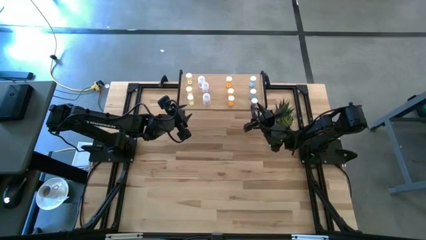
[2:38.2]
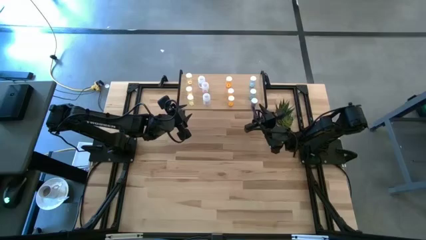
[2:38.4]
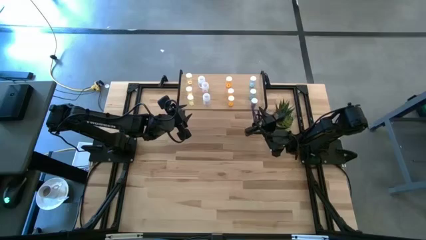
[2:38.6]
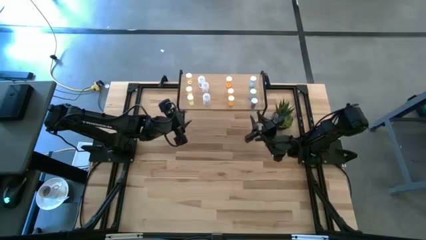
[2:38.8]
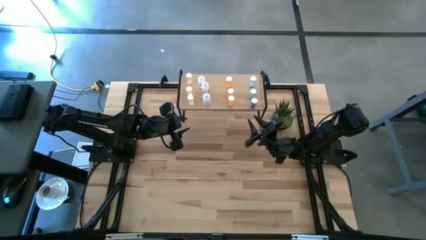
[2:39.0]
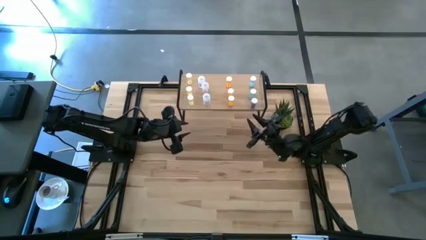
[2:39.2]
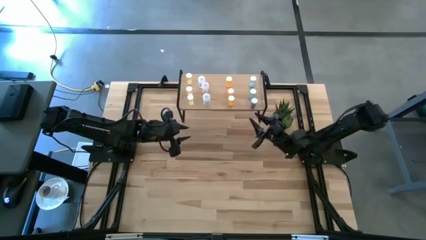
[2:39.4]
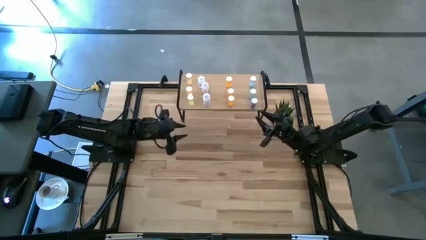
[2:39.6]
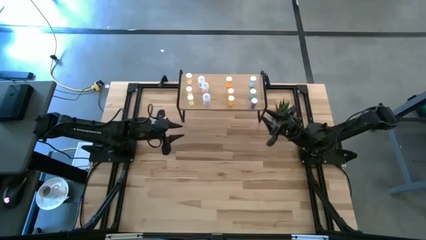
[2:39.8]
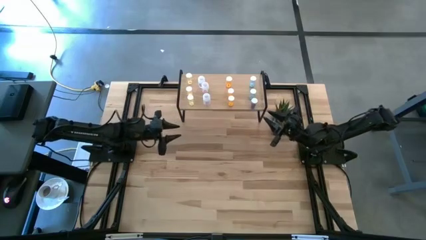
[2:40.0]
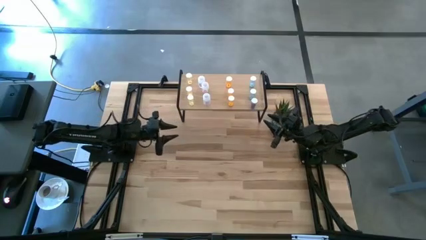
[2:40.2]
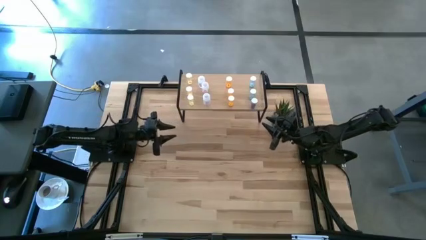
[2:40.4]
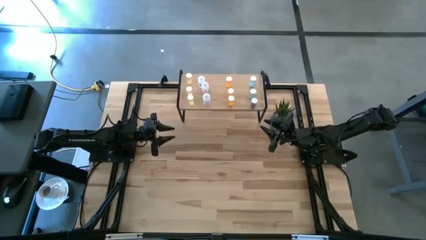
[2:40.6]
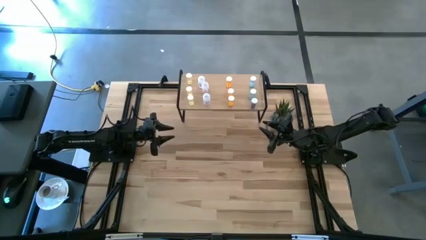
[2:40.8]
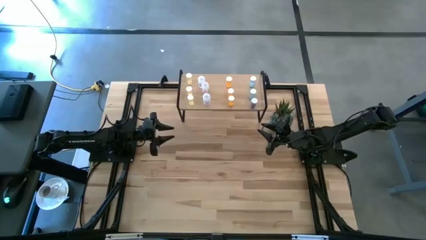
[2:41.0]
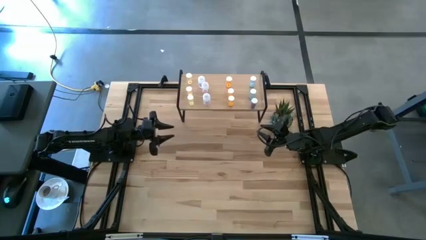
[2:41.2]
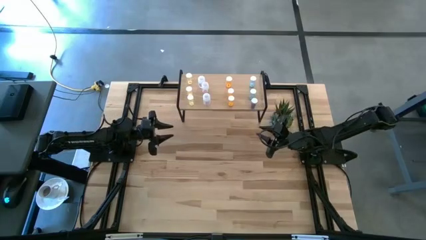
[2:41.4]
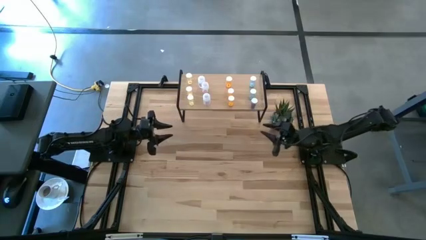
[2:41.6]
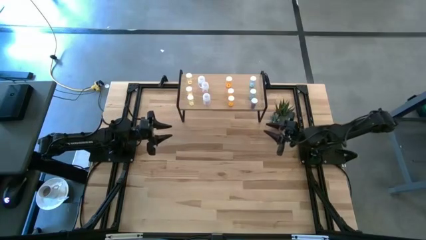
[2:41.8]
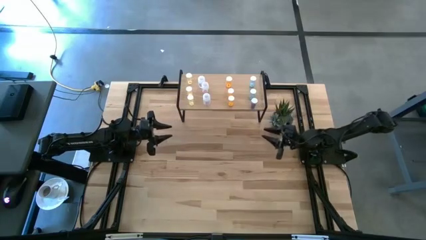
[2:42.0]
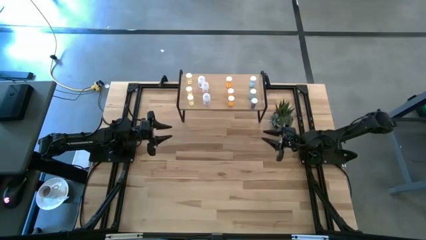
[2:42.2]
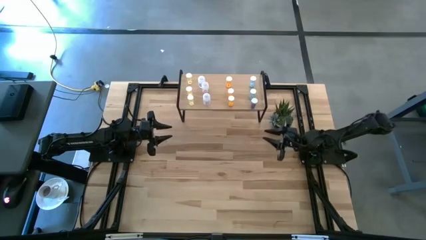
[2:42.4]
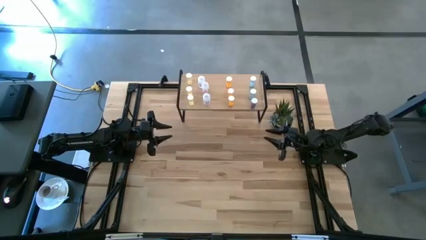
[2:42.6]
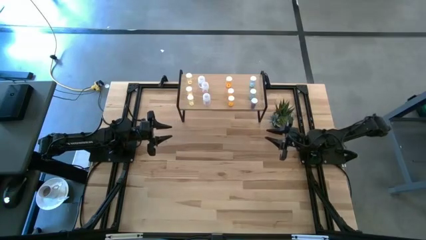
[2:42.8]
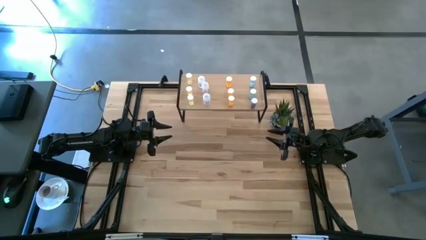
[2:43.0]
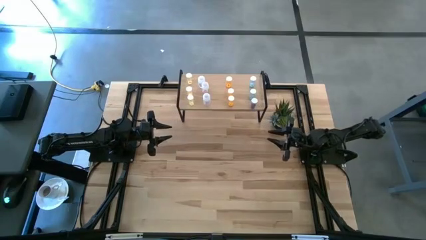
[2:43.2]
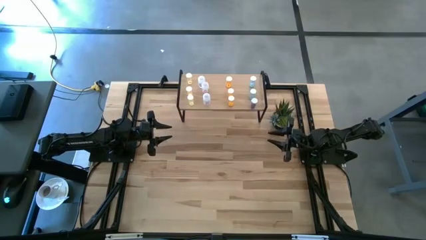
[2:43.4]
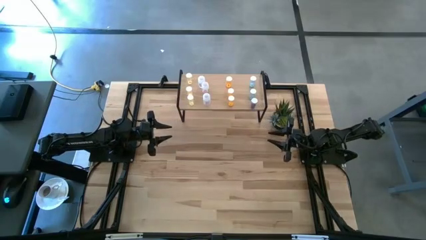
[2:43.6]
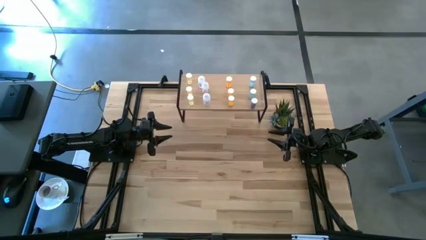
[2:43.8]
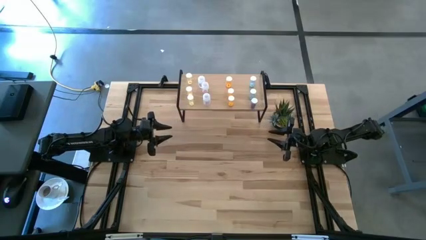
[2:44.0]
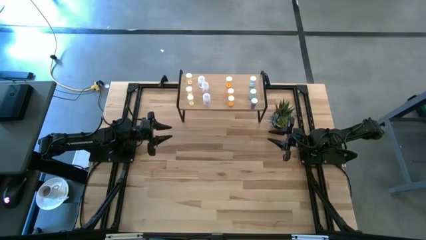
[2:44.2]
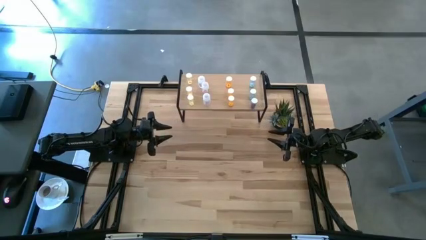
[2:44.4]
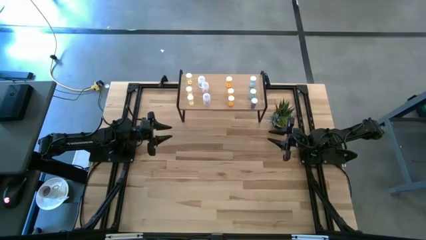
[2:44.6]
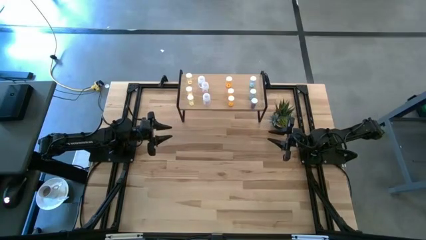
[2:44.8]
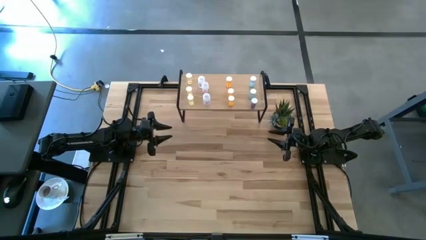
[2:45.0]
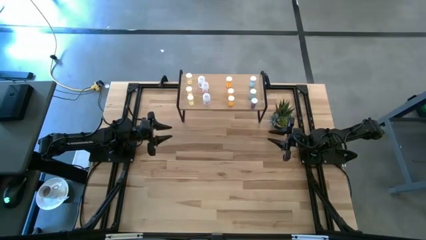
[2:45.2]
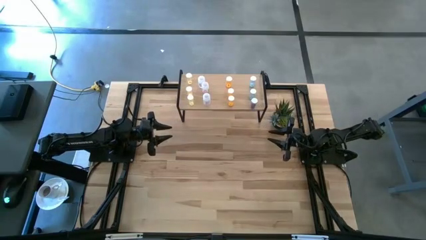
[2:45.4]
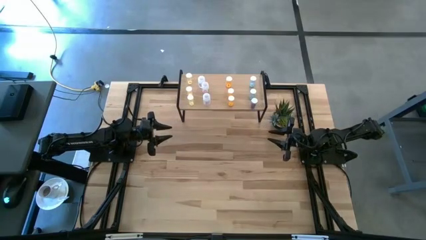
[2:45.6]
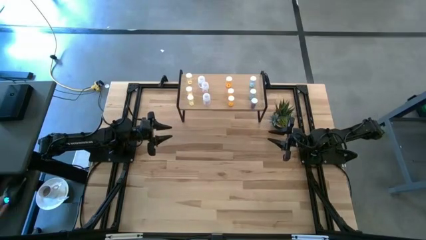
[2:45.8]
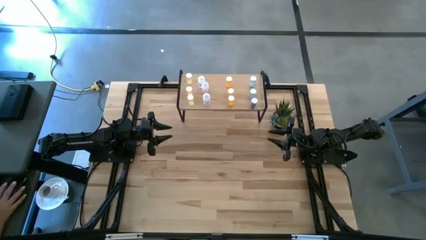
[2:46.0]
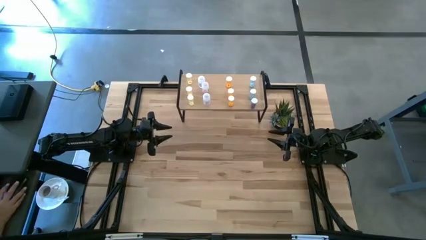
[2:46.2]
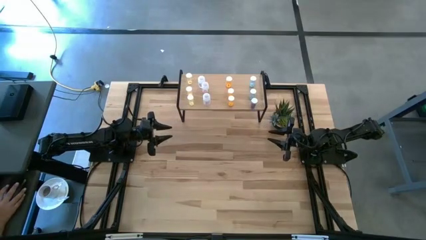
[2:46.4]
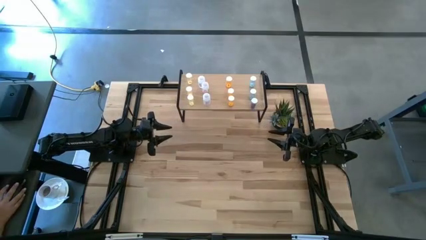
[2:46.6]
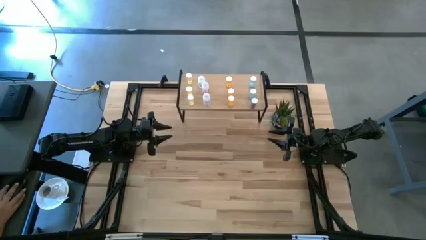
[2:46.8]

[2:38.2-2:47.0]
Task: Pick and place medicine bottles onto shelf by color
Return to Home Position

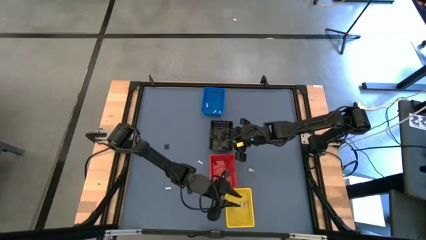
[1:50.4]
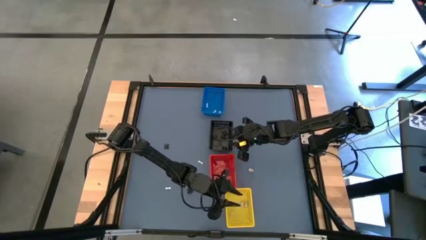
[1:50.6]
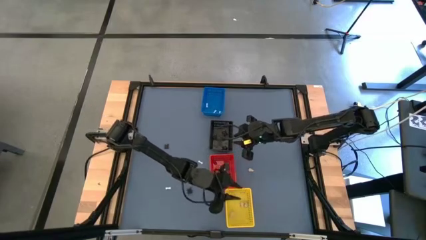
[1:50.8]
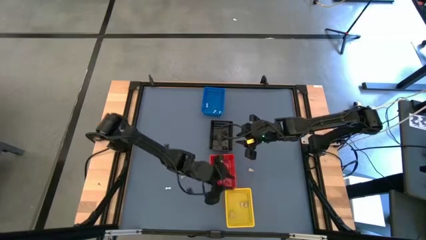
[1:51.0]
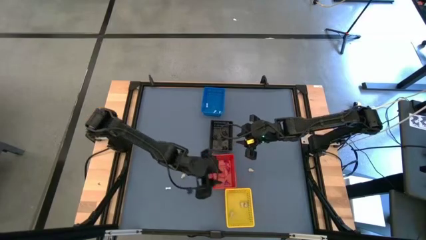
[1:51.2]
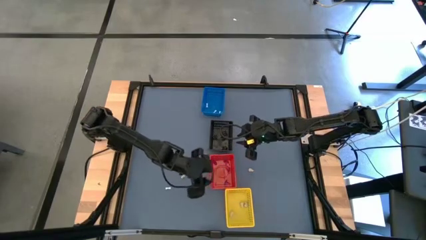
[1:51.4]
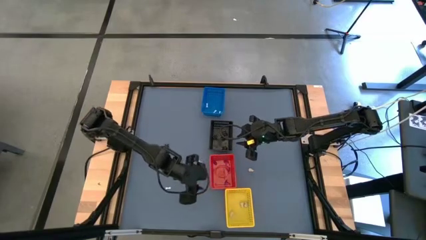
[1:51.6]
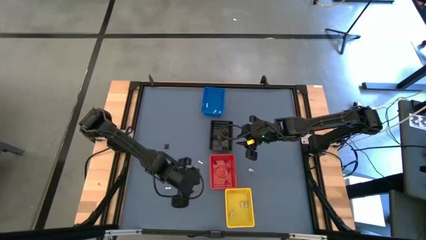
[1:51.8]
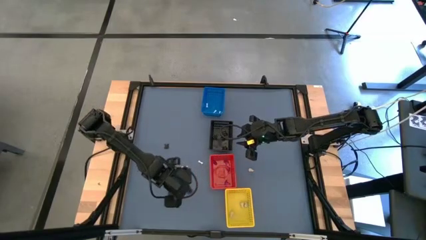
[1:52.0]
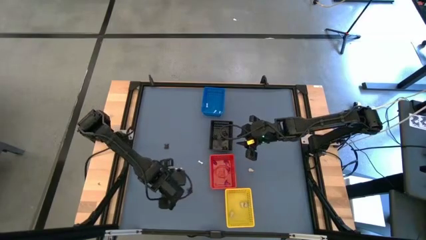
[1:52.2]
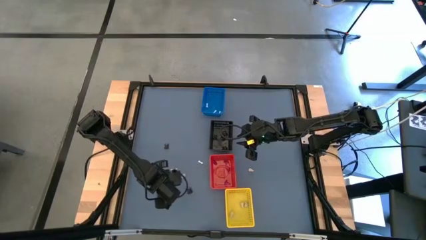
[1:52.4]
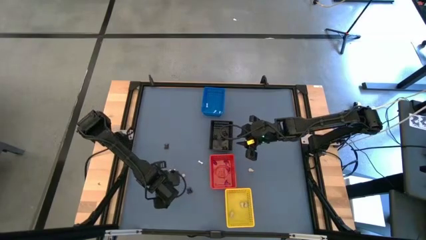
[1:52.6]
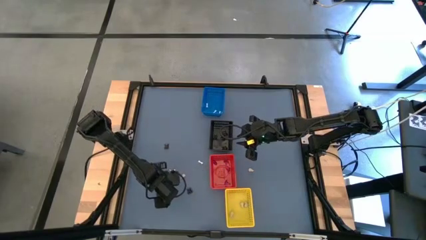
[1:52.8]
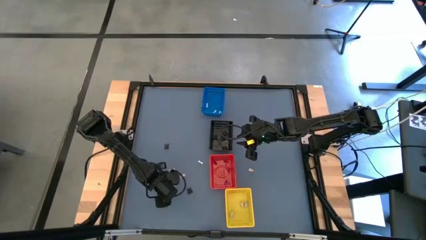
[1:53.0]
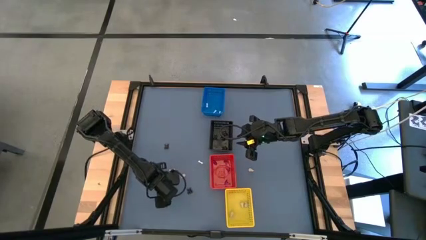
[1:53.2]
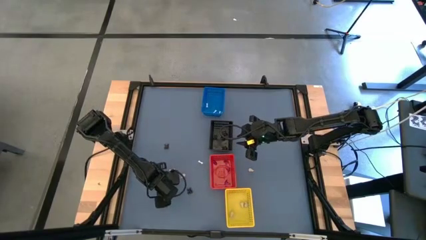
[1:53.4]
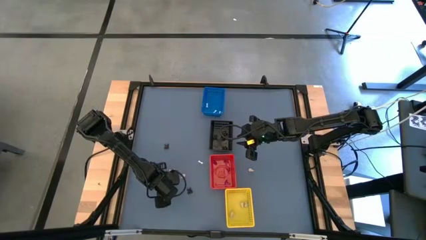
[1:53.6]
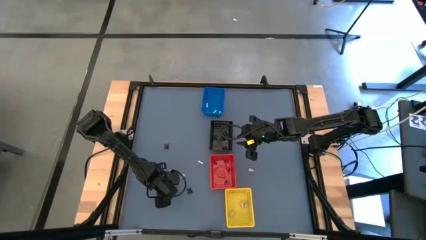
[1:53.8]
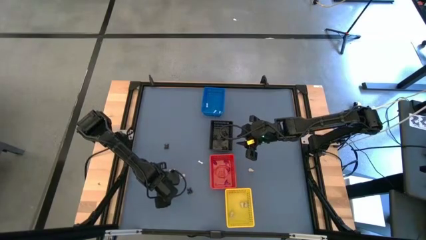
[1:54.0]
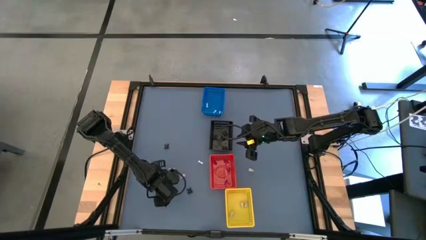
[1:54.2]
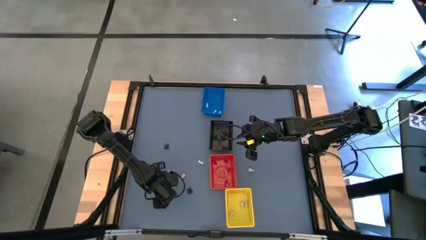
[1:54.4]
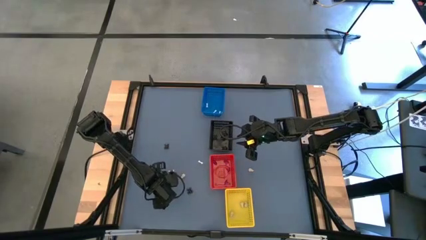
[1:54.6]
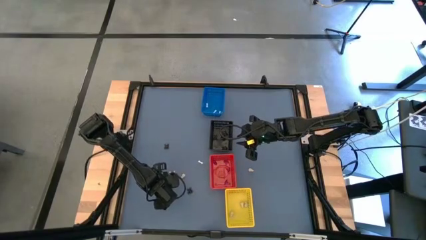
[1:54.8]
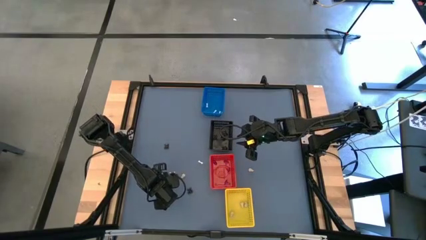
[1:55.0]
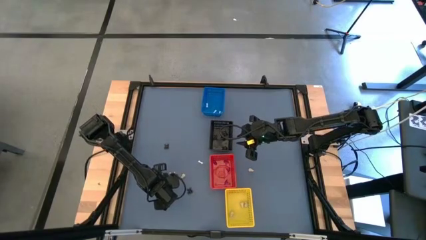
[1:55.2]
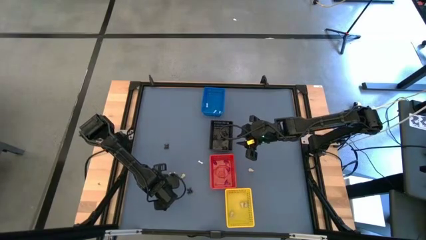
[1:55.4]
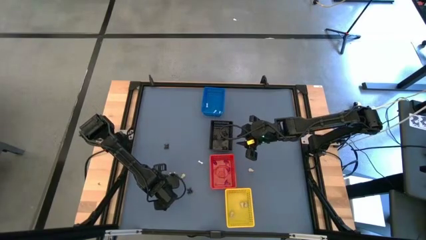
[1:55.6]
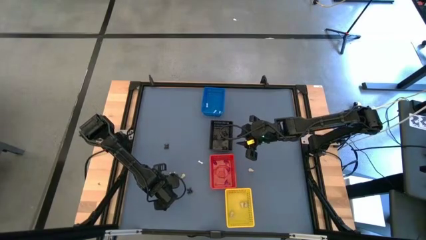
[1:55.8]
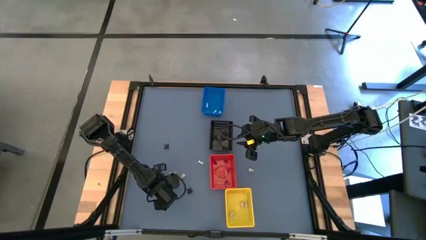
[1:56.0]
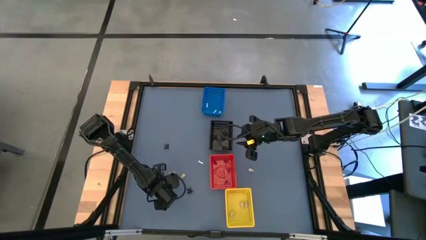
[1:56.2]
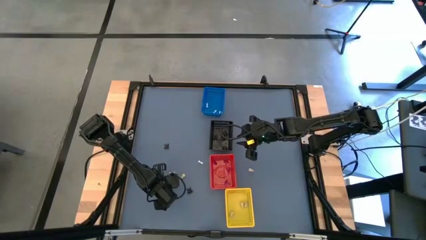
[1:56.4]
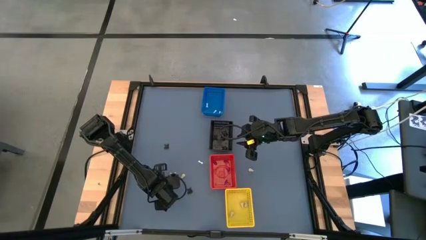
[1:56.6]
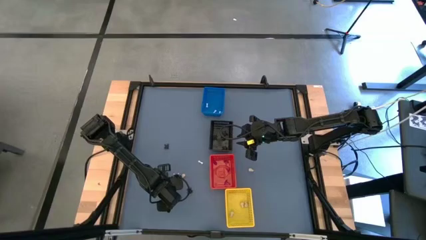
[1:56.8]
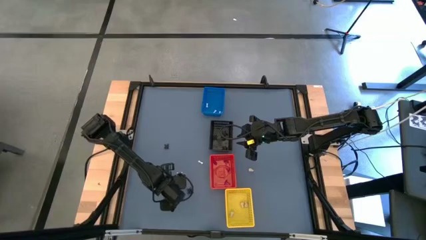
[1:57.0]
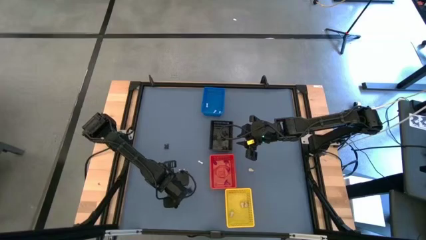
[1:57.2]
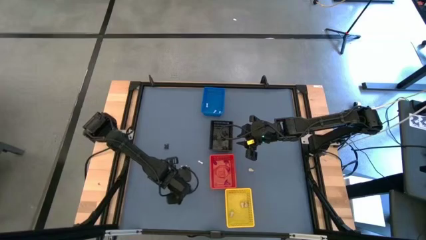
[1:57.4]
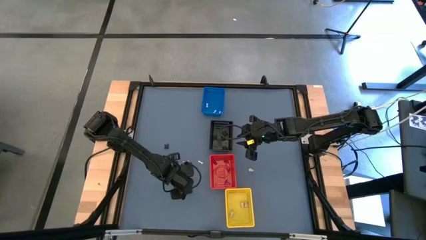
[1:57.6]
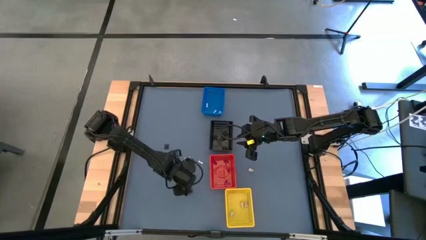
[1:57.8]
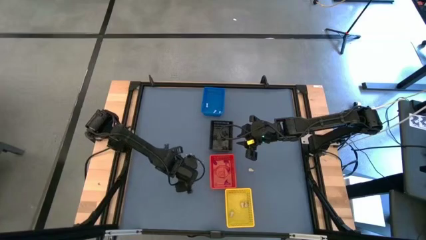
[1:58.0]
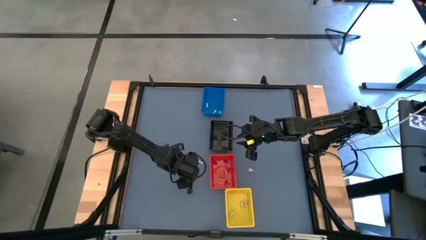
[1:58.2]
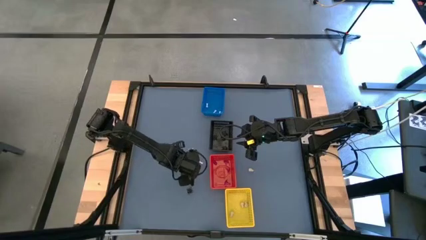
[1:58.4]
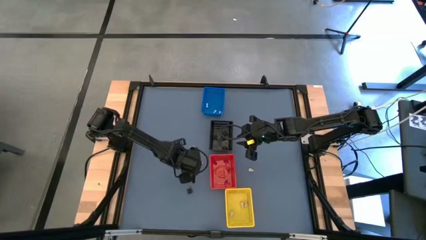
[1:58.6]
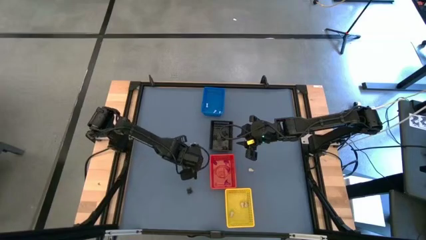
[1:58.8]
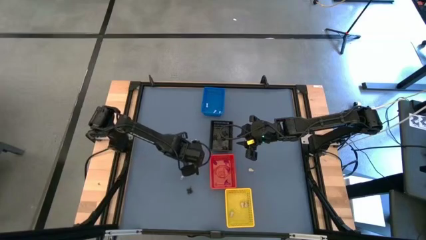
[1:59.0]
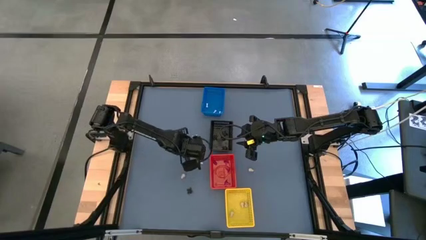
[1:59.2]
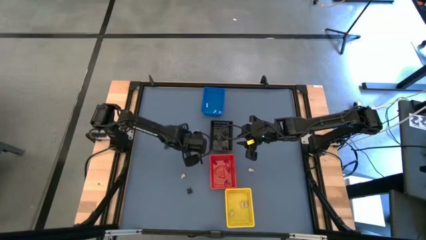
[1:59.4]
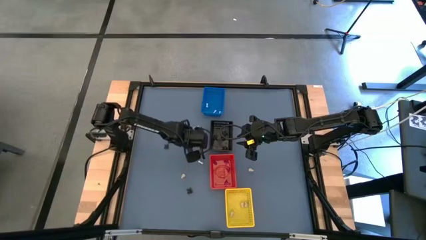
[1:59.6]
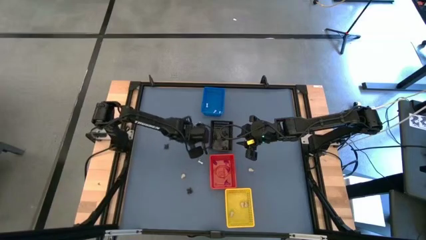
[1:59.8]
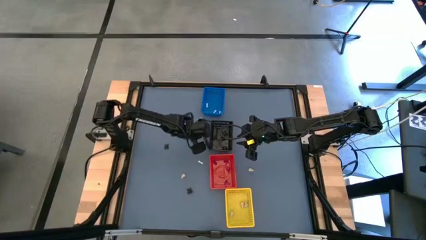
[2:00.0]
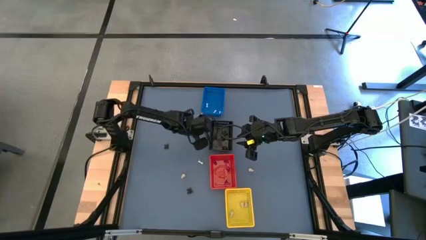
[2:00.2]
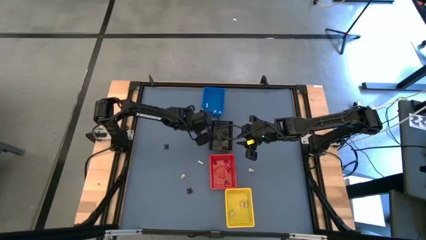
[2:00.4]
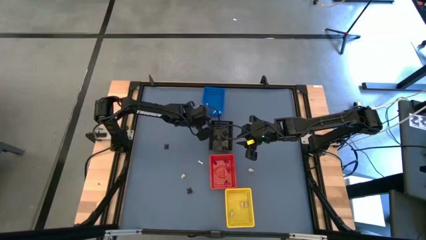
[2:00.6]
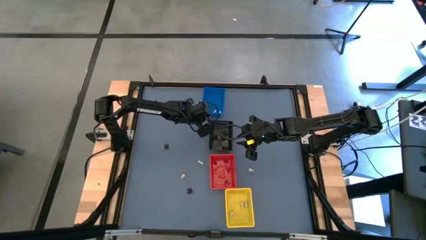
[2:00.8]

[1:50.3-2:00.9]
Task: Sort Halloween decoration
Put the white bone toy into the blue bin
